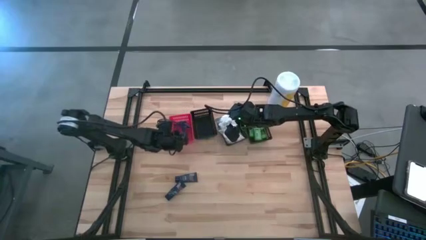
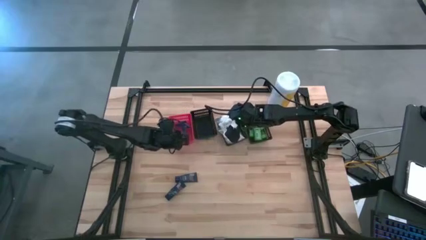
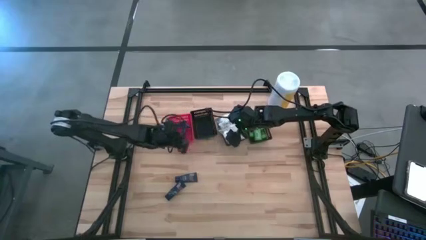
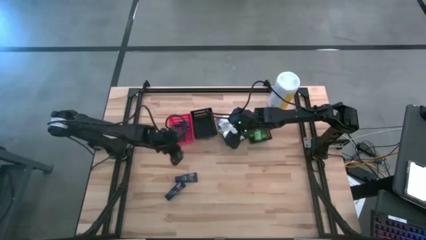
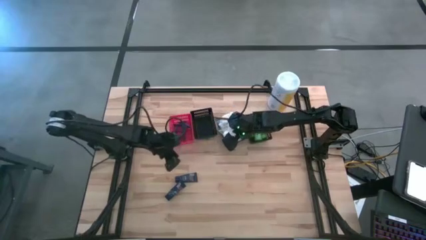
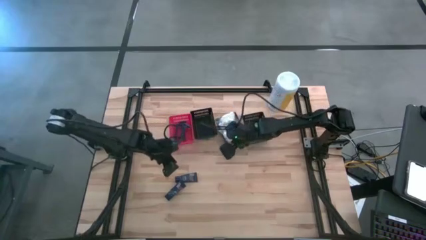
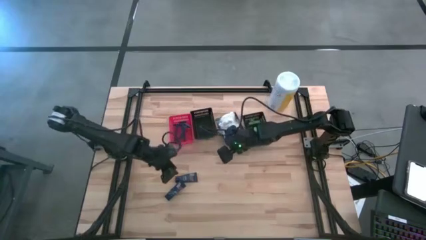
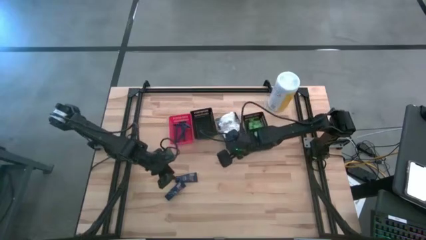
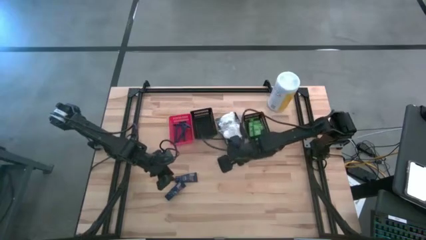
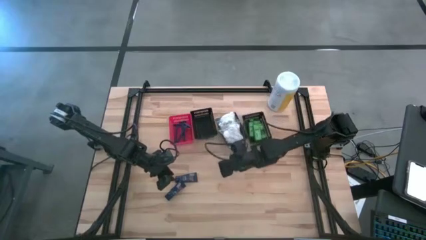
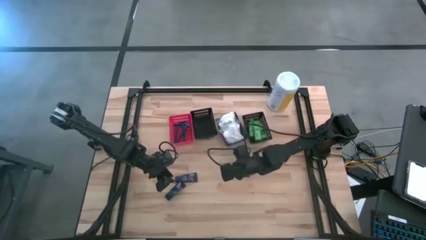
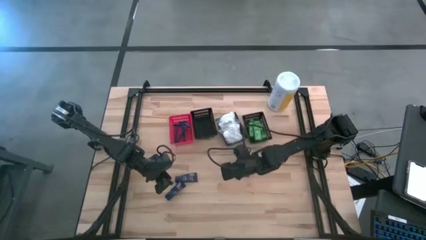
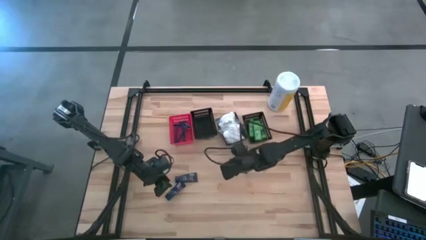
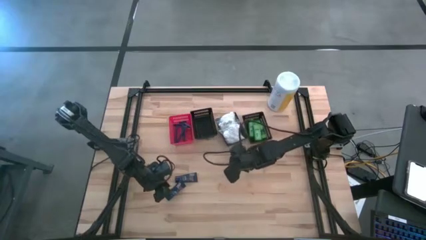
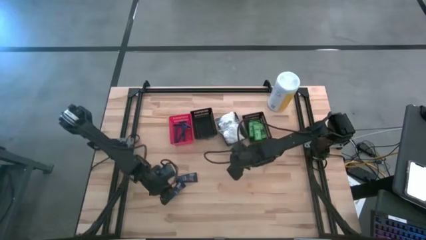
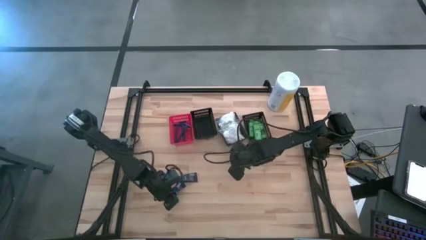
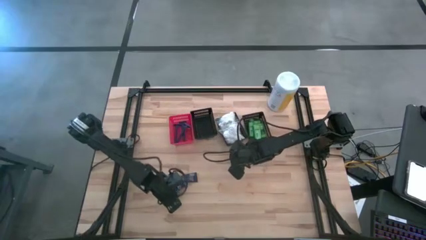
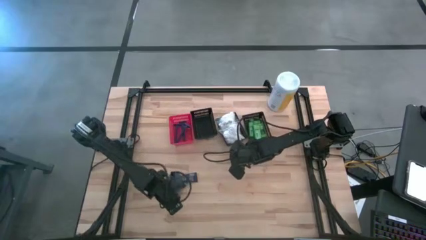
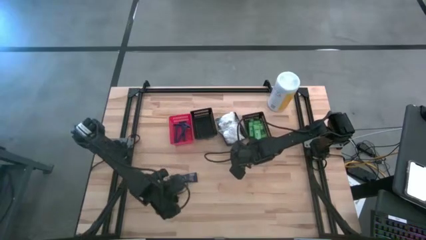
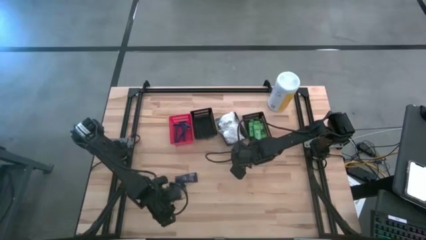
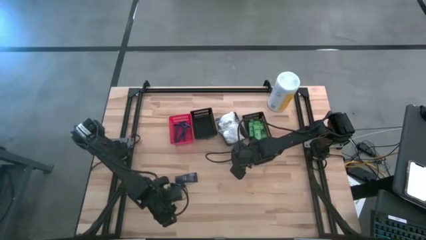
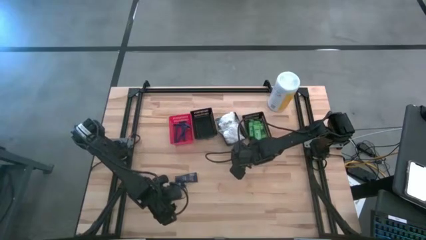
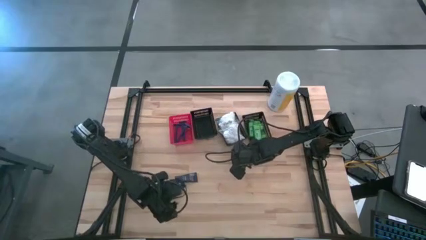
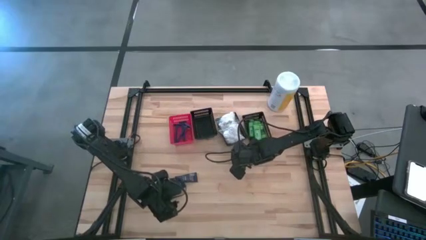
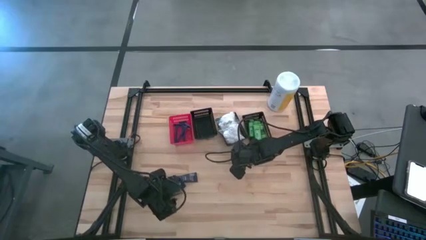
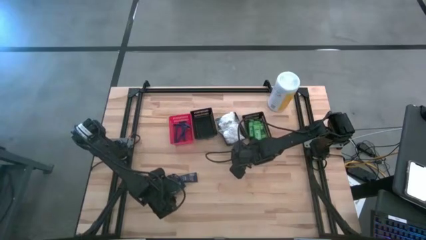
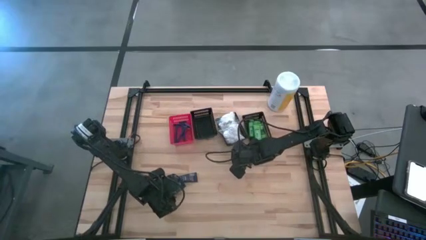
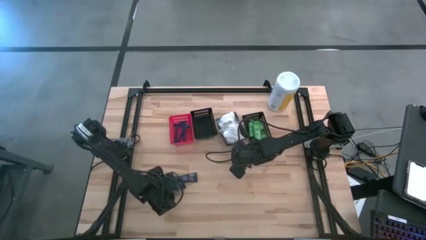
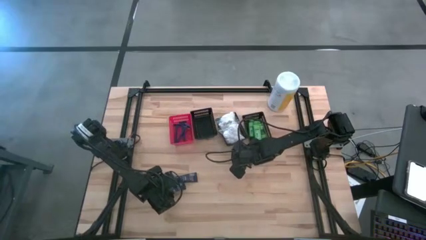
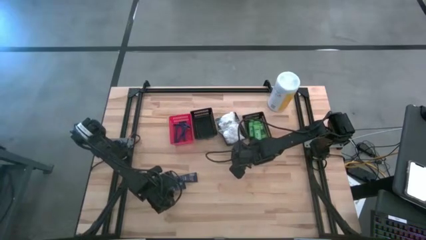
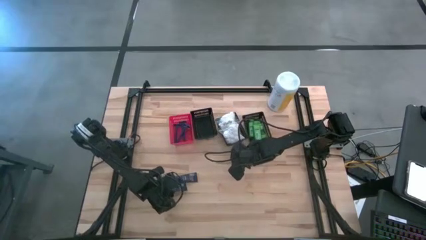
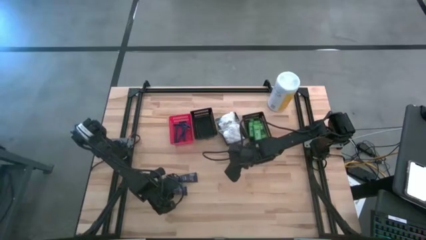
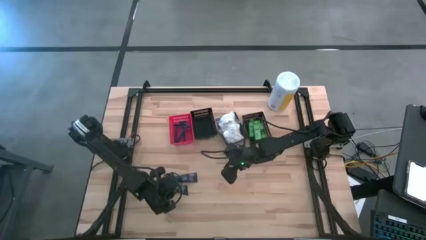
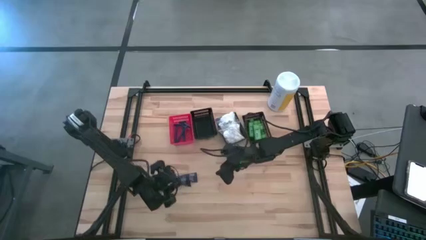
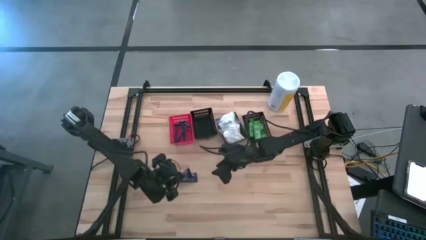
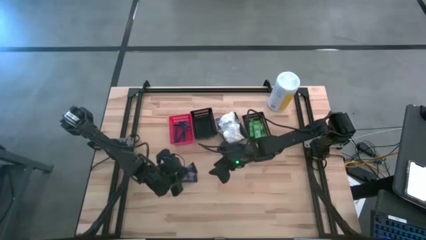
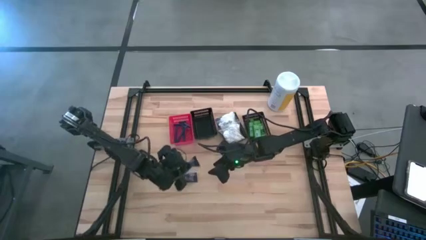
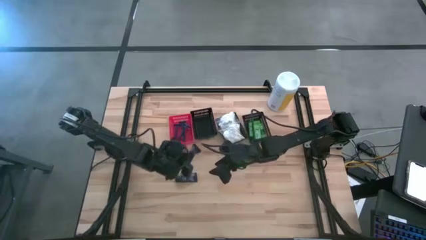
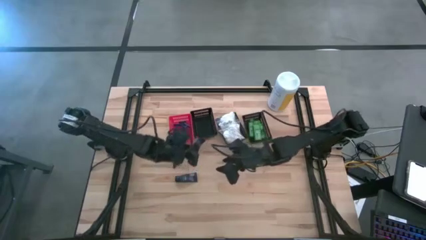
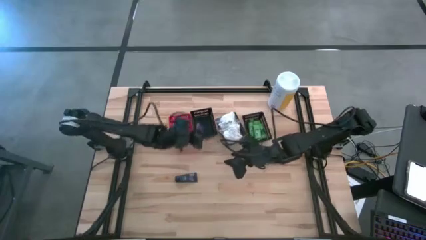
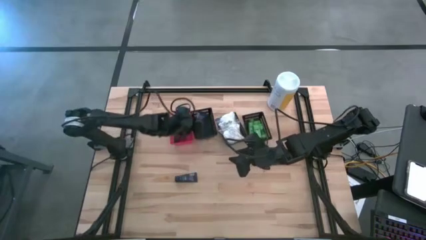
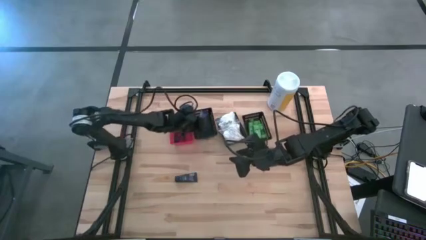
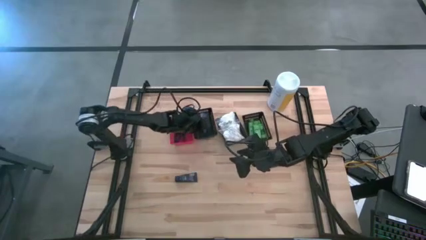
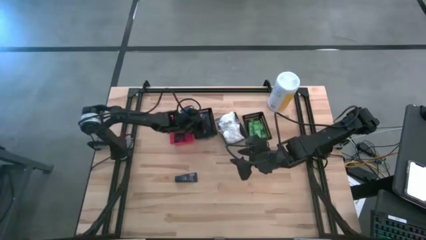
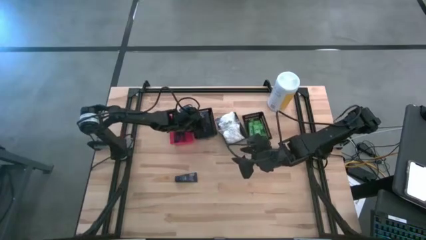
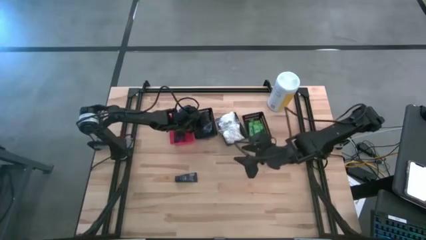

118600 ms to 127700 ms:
Task: Pick & Place Travel size toiletries
Put the shave cream into the left black bin

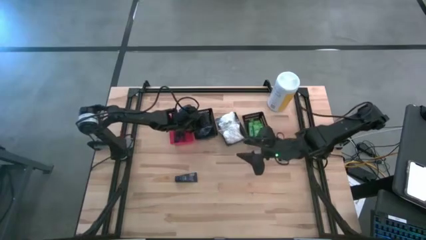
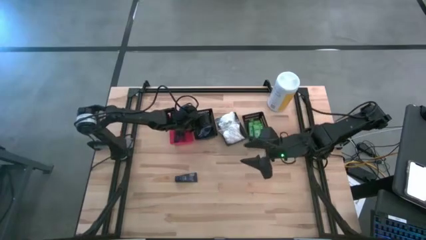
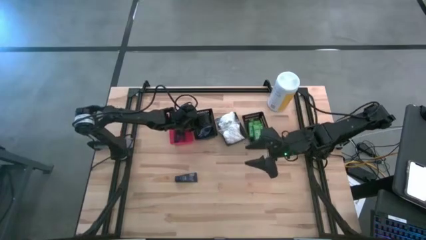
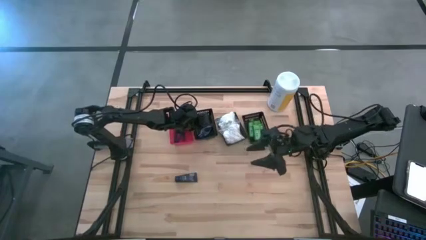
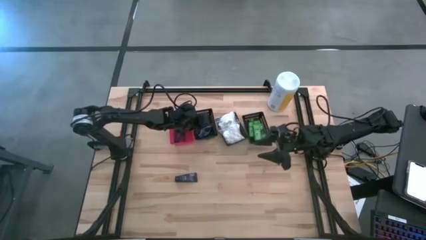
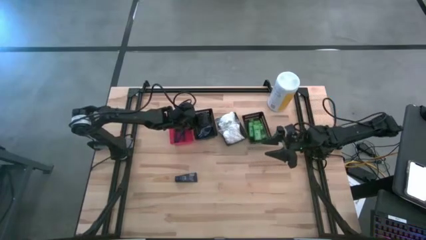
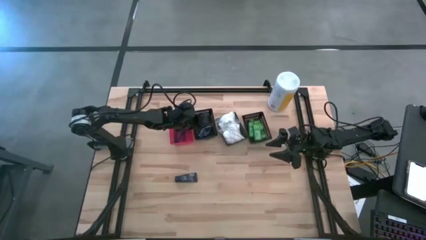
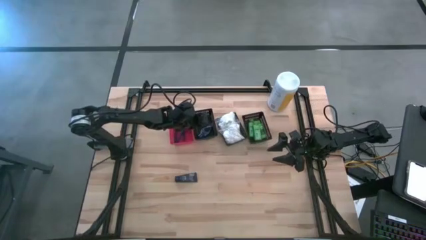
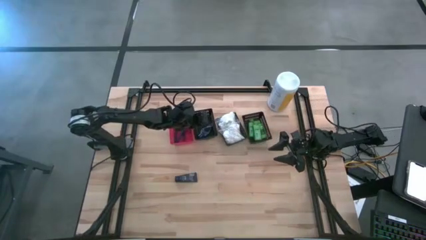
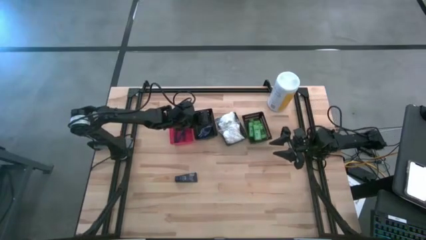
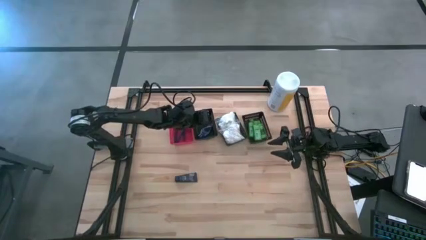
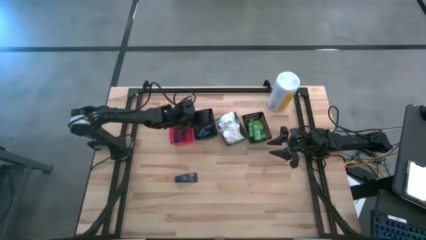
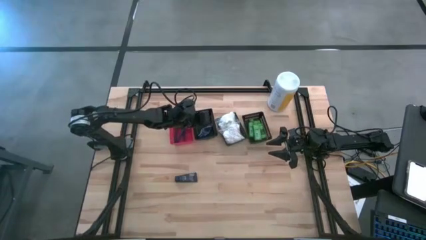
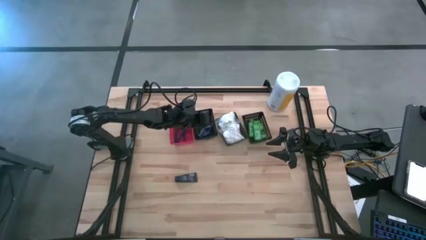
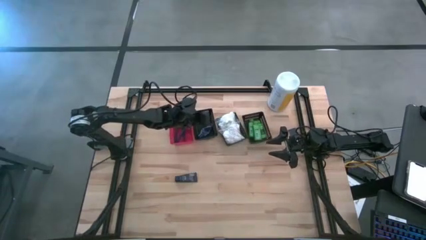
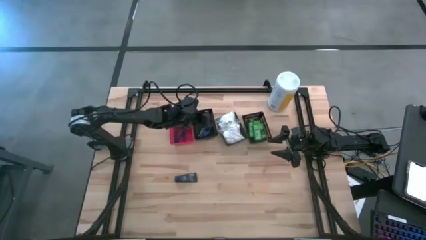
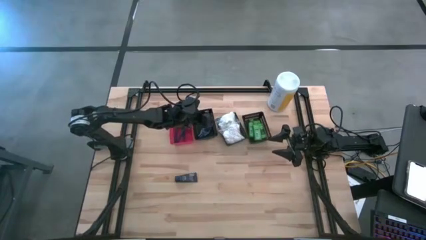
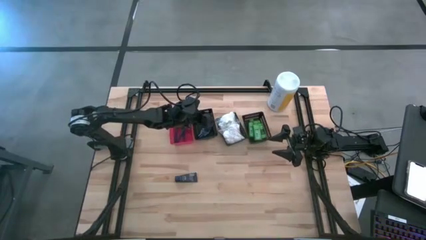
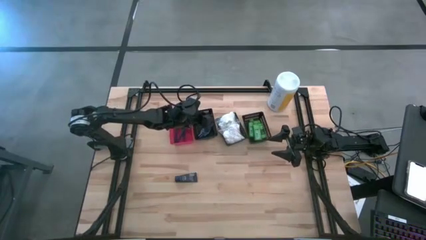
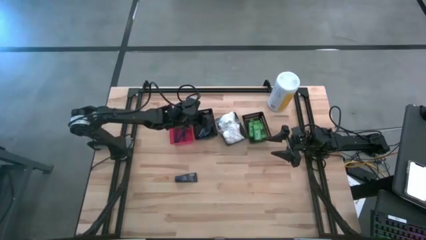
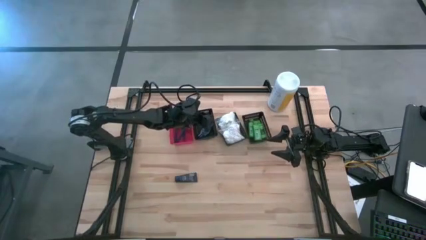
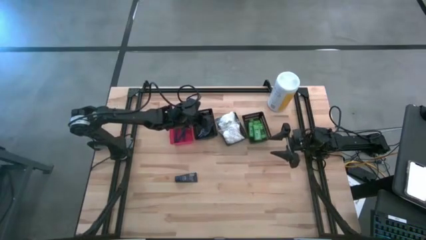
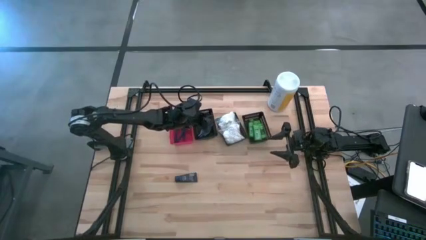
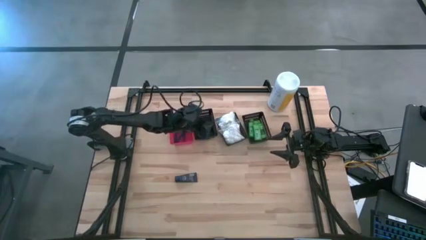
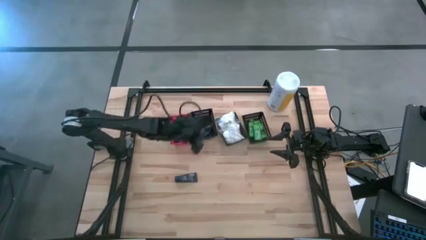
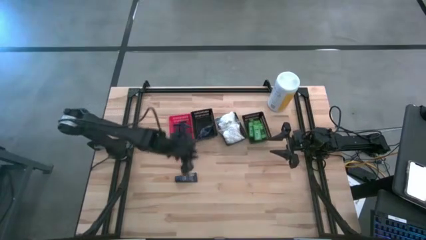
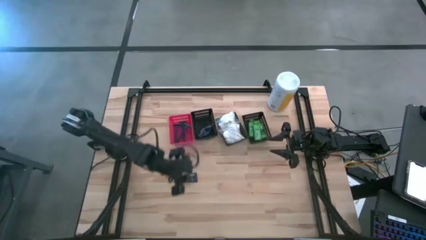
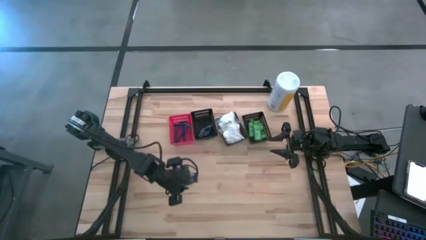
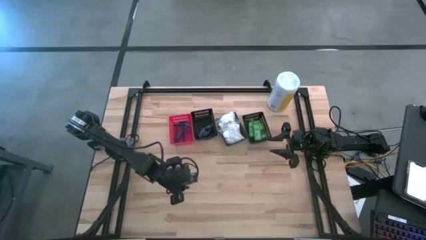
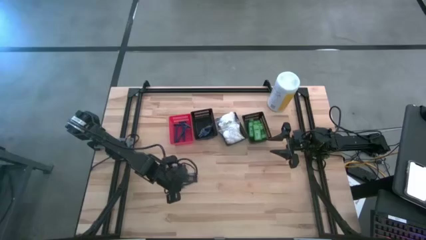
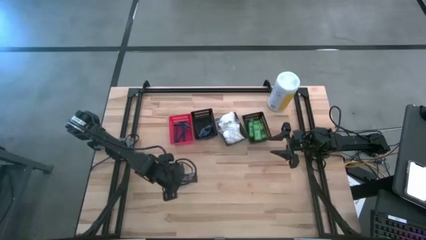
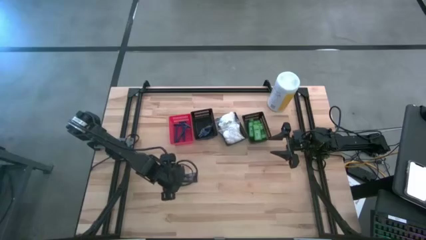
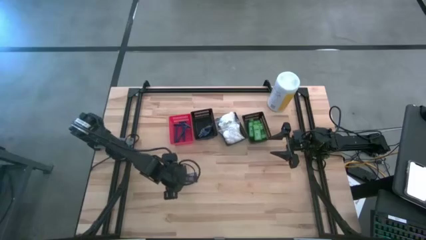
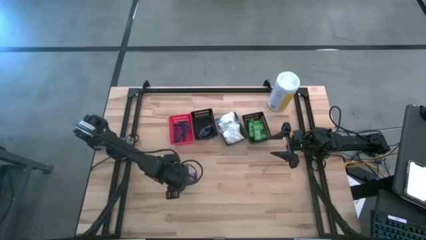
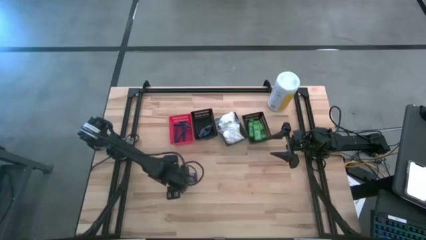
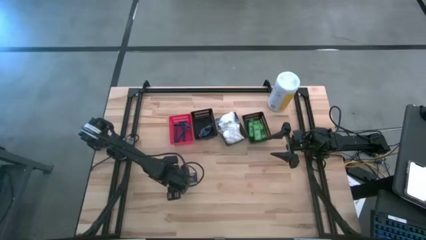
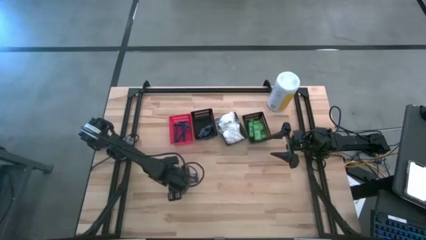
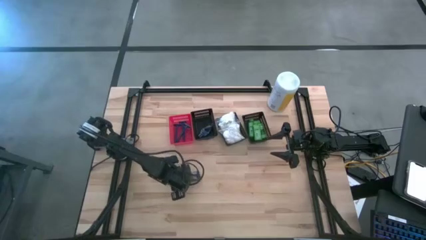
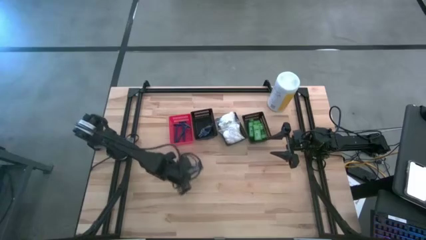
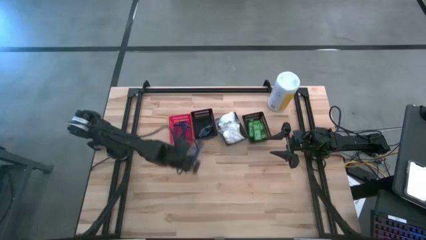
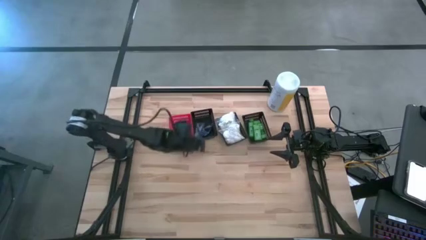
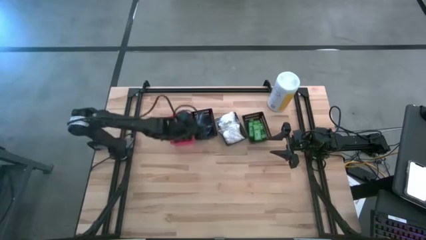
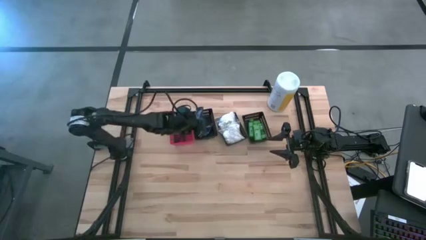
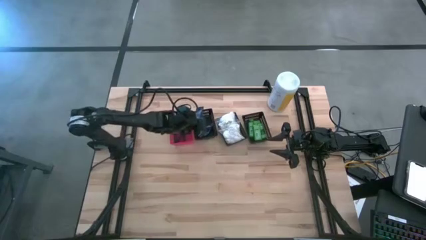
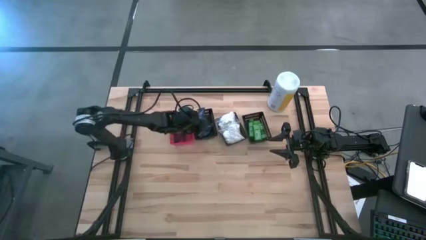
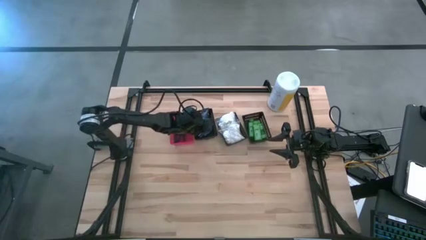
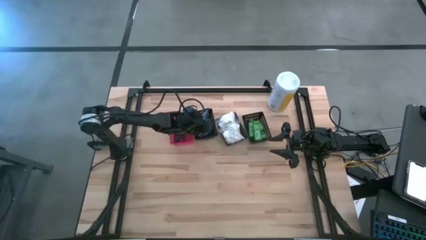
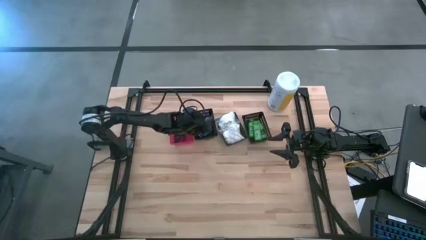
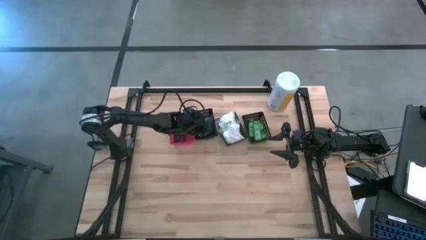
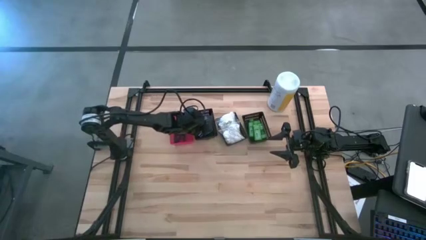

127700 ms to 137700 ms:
Put the shave cream into the left black bin
